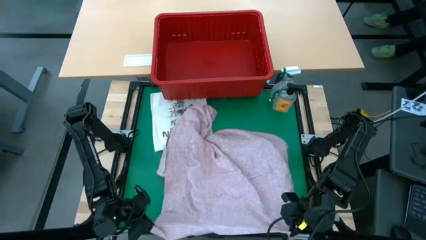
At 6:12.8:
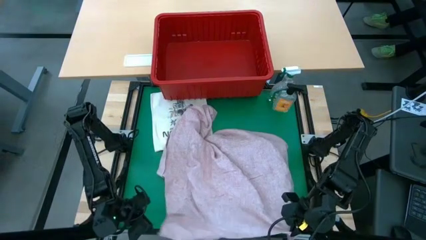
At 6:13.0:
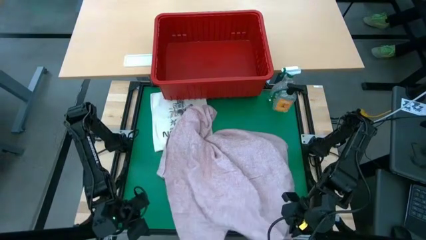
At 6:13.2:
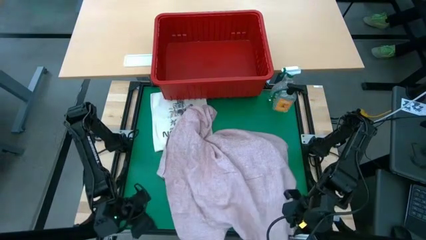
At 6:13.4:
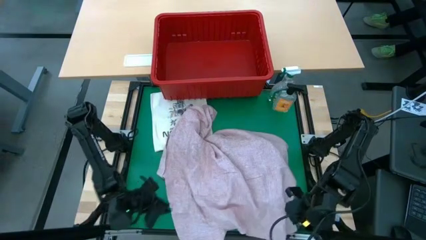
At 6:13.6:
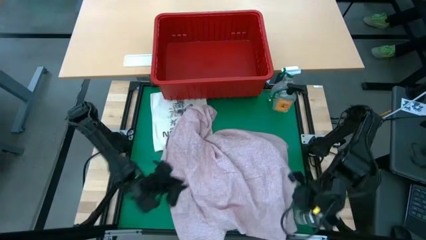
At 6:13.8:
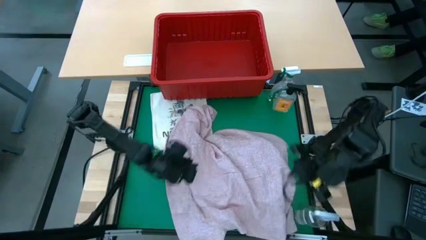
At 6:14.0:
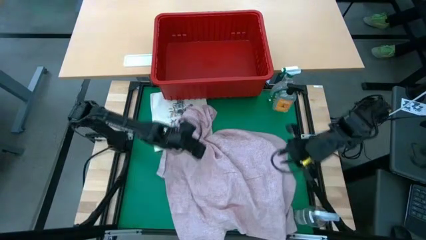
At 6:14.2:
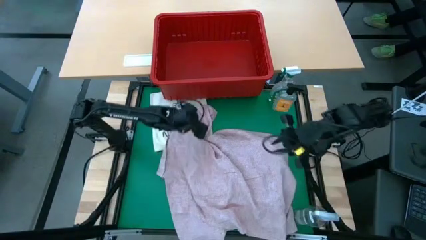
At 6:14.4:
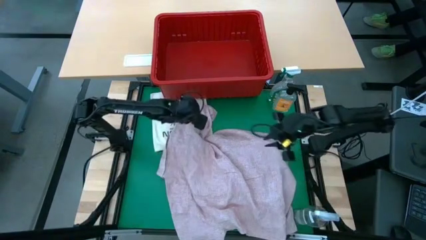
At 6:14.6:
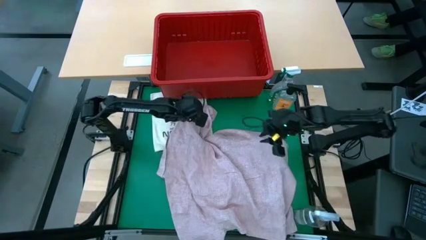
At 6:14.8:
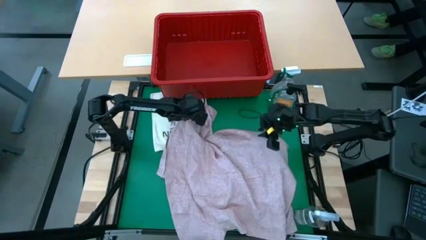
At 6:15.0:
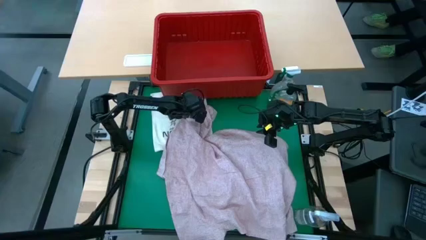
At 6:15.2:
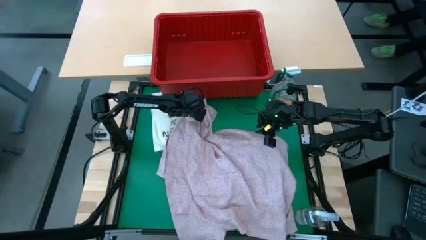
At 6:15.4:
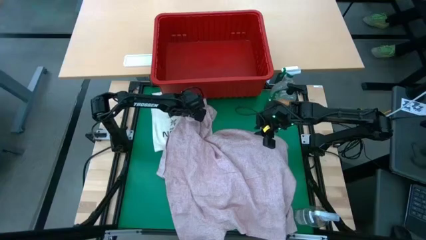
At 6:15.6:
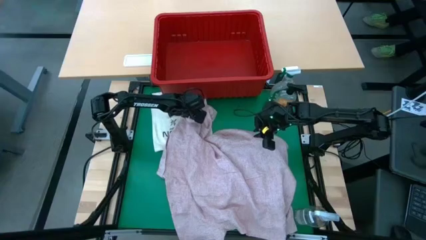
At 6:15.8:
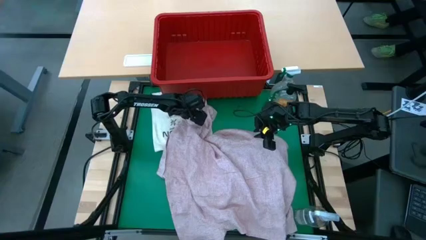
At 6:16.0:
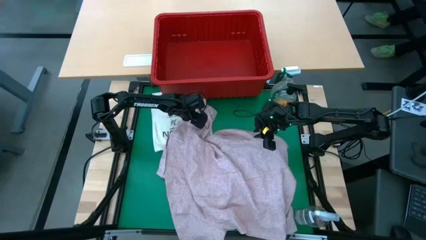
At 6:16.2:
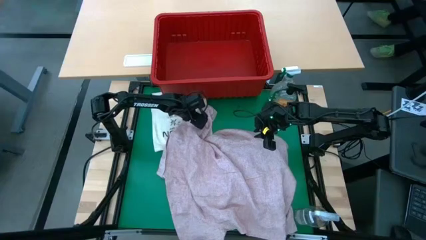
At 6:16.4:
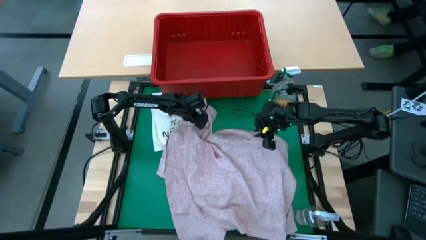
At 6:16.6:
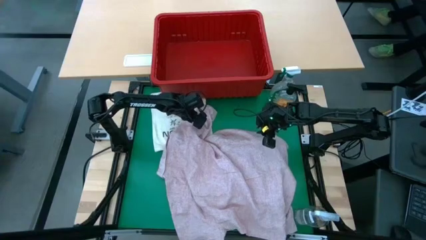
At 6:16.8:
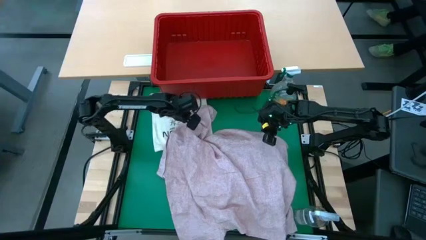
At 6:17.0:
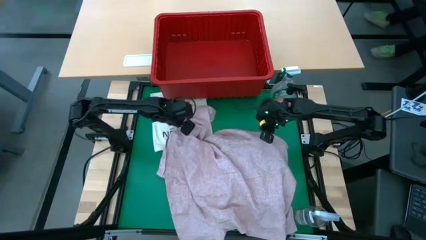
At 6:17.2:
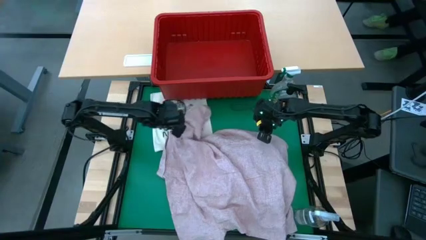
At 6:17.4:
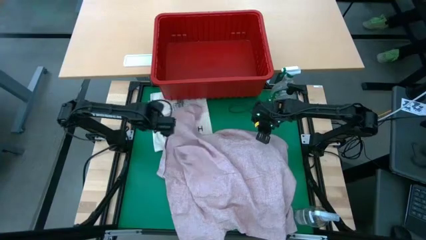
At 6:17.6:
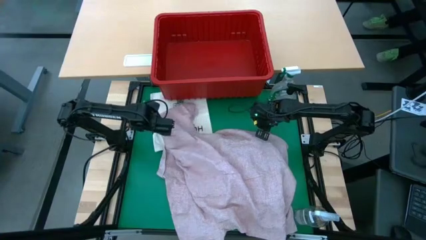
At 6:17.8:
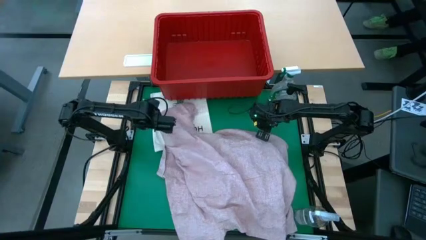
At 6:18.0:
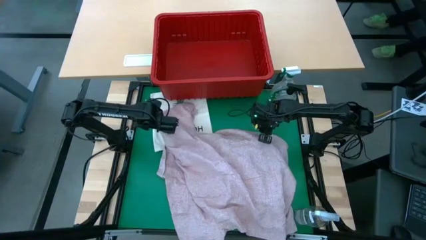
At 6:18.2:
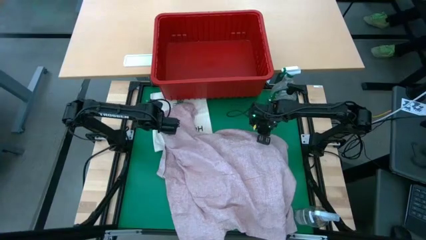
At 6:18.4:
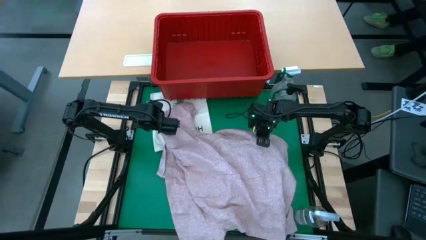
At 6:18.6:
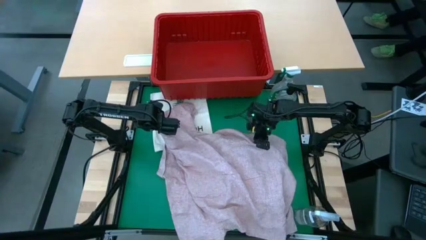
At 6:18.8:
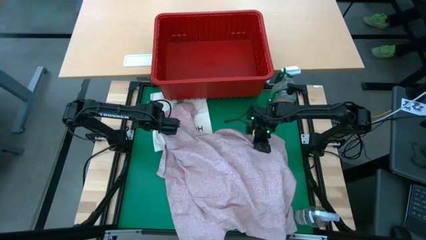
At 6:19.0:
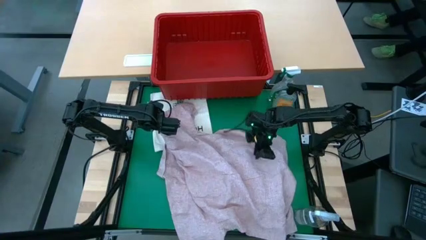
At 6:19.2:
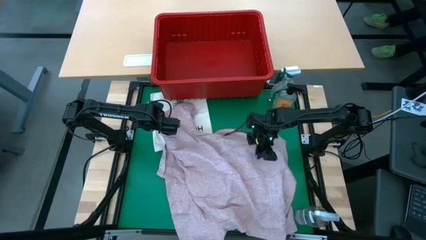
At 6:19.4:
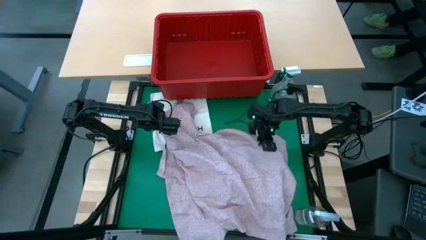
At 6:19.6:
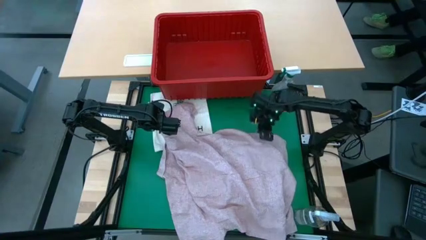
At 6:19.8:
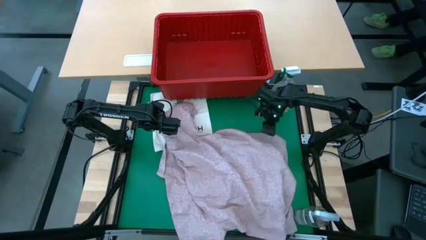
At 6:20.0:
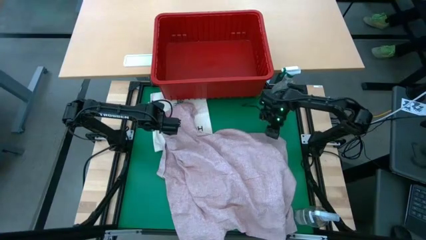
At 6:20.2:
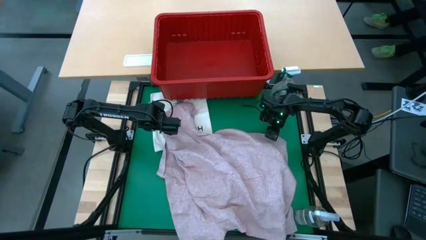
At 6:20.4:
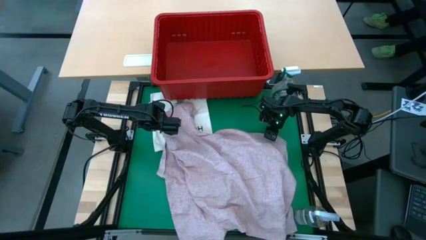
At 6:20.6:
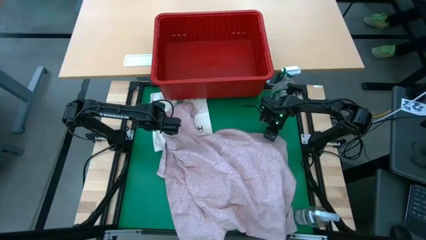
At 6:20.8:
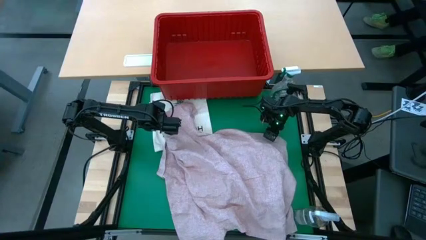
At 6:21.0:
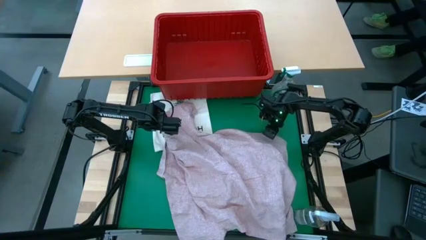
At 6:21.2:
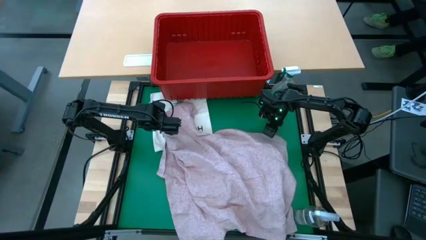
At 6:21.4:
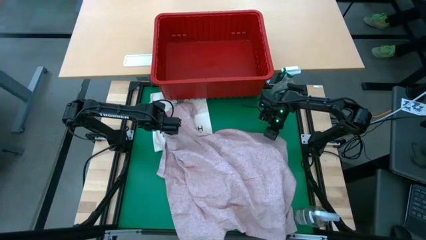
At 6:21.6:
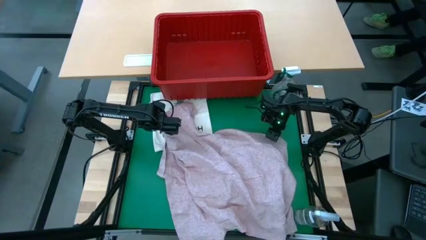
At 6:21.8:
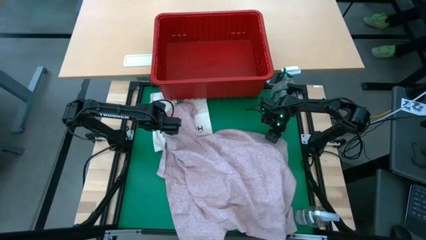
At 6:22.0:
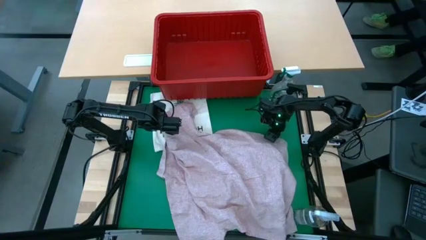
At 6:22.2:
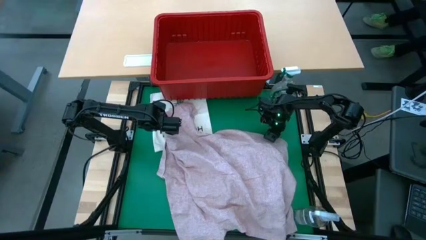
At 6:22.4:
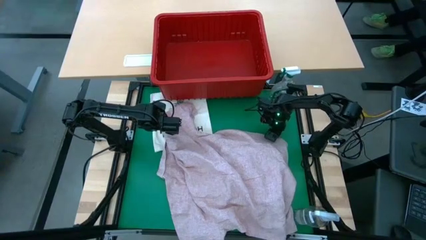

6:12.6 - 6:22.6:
Task: Fold laundry
Fold the pink polo

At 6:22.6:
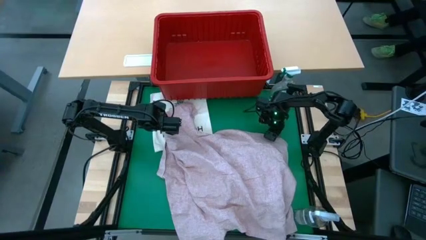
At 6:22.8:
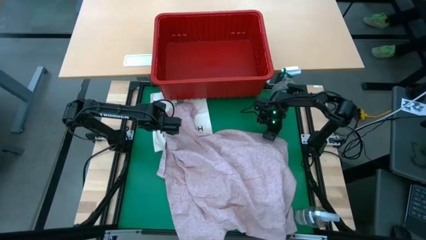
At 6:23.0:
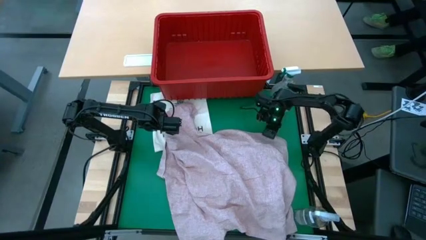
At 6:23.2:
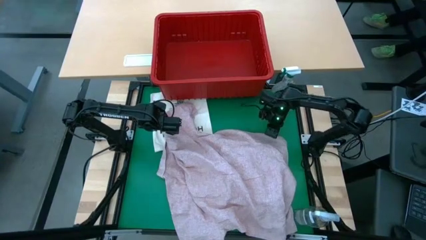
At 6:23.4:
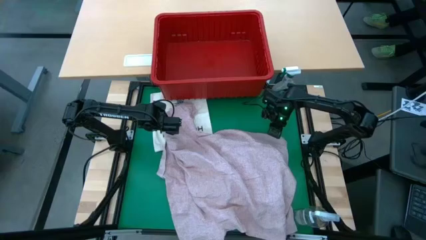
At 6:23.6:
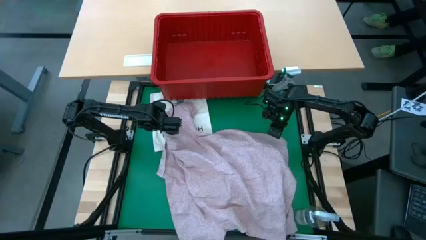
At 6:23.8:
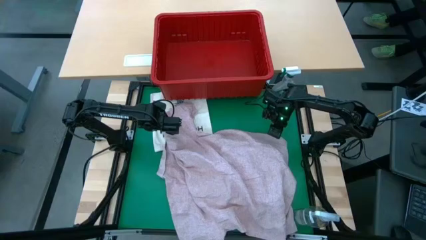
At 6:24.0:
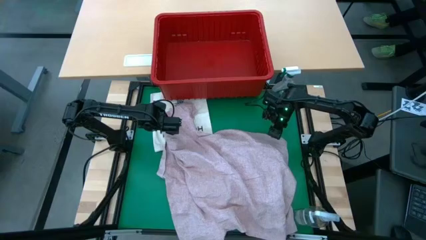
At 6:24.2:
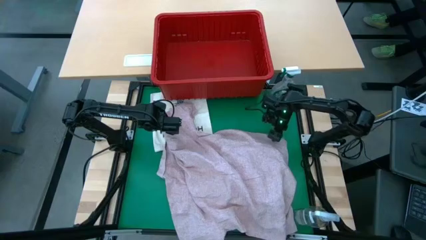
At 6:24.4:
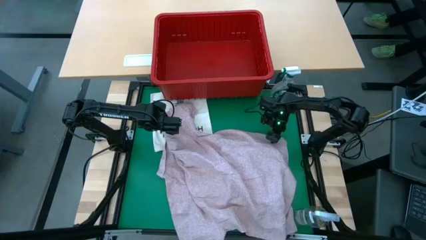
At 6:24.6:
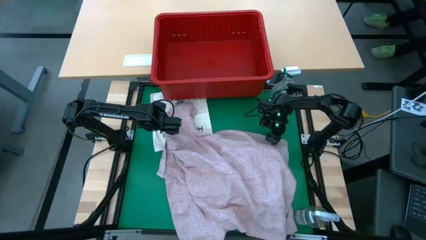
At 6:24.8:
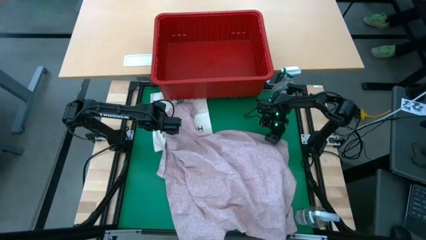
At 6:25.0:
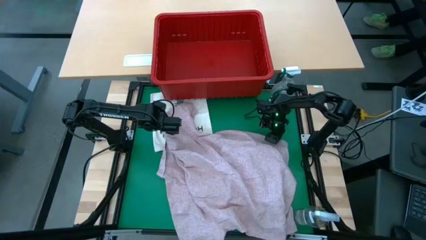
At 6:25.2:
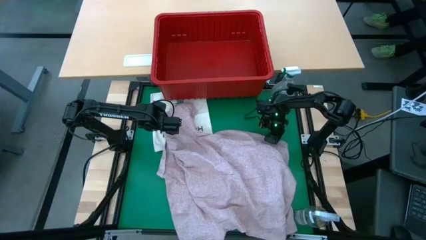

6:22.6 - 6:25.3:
Fold the pink polo
